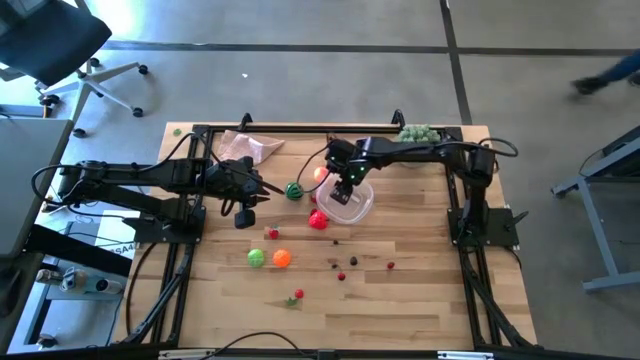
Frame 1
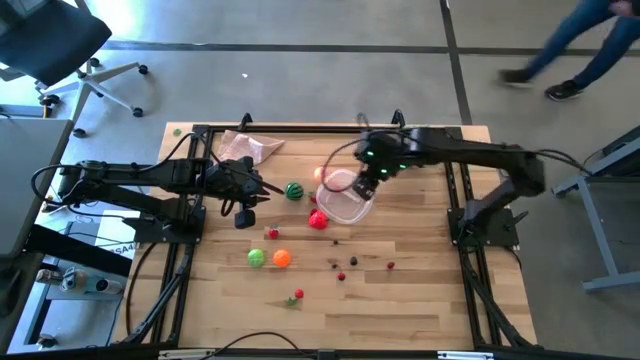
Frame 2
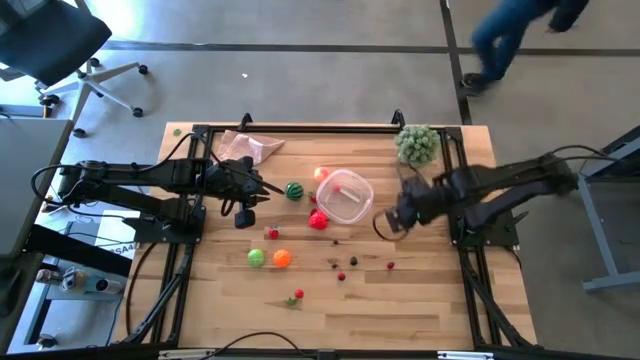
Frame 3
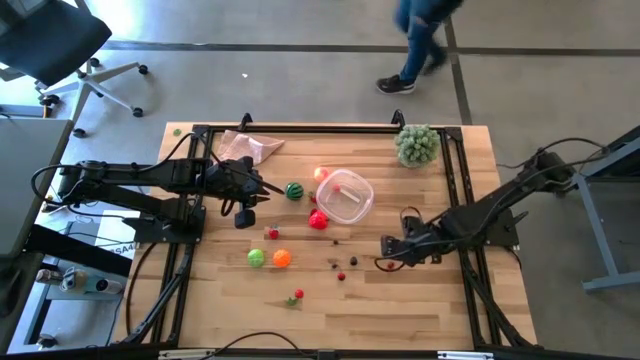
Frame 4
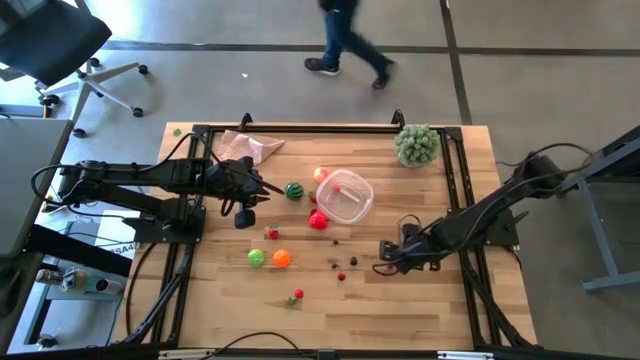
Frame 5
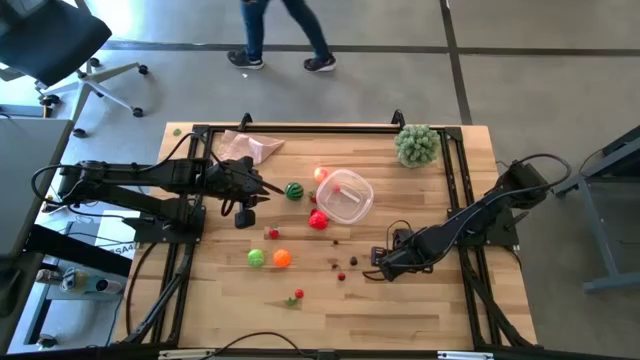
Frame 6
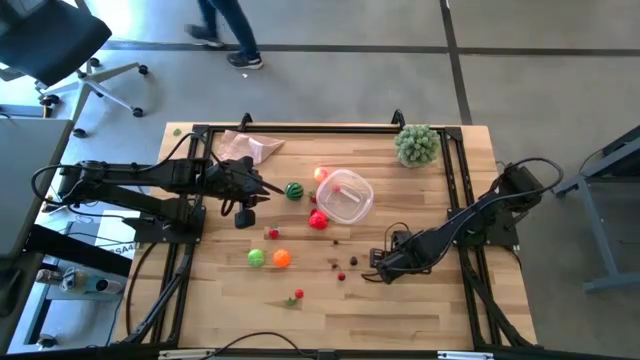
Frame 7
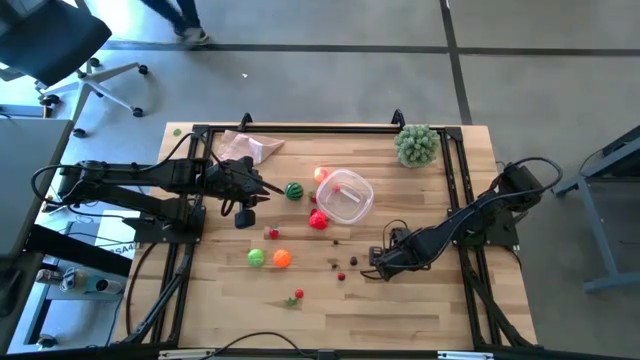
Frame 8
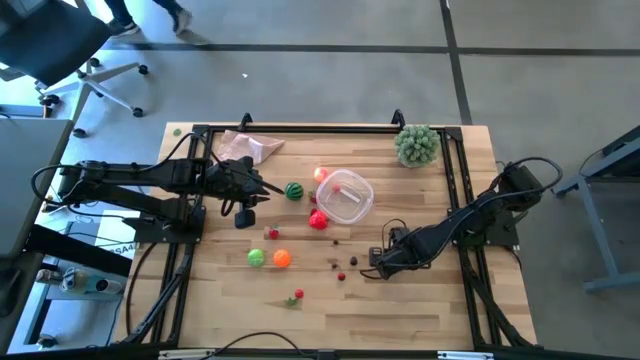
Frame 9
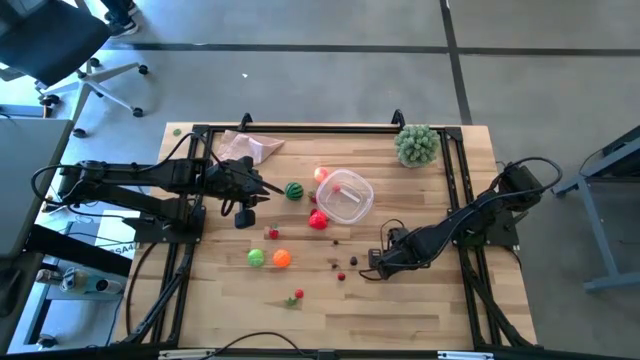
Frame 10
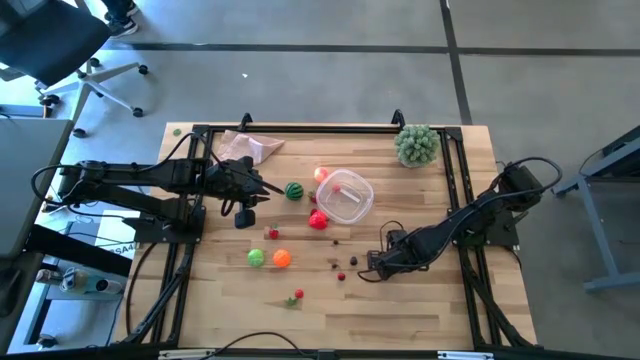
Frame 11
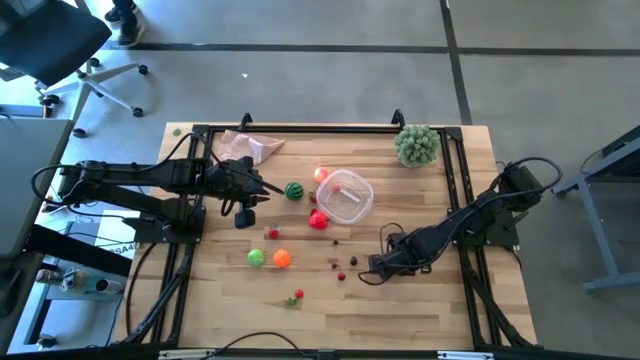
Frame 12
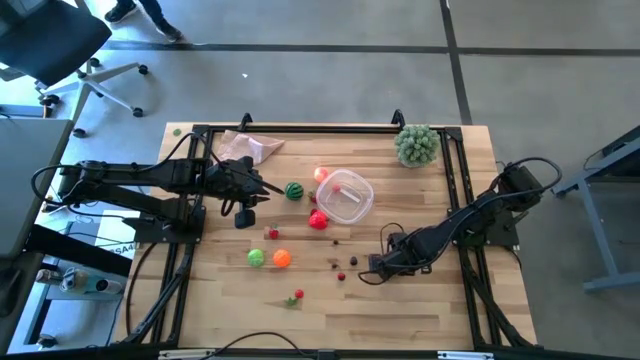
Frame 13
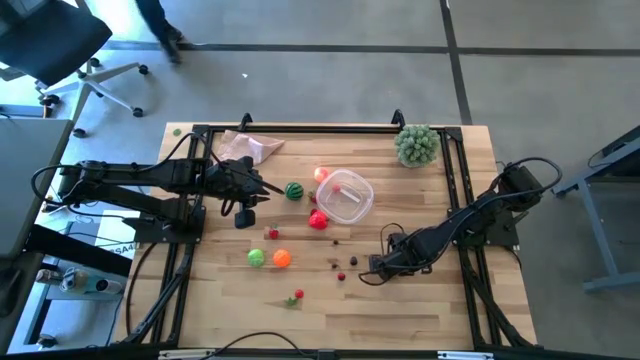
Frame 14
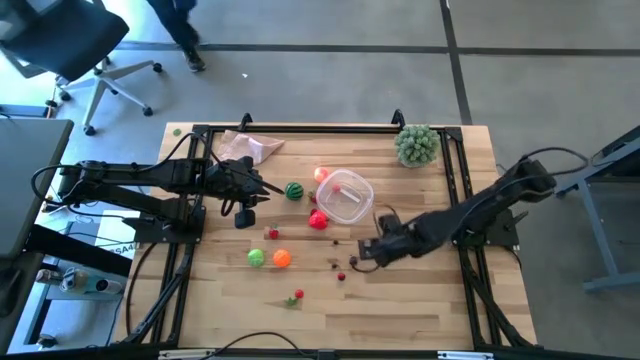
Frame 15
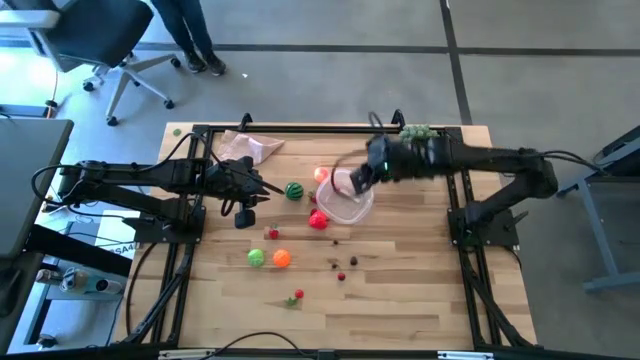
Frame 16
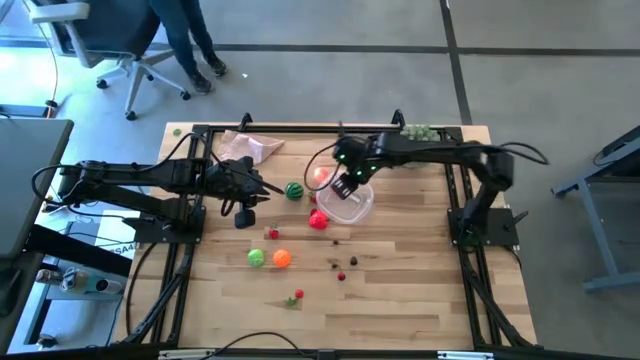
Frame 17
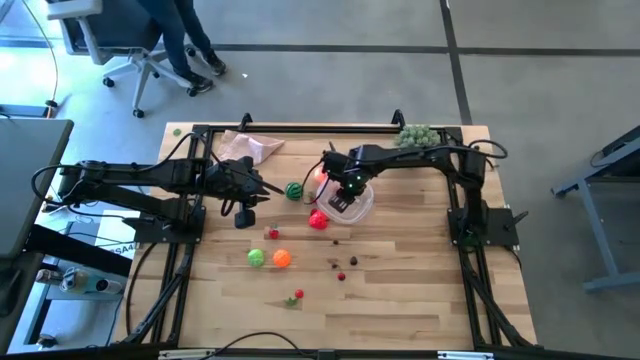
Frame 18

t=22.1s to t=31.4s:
Task: Pick and placing Produce into tupperware
Put the cherry into the transparent bin

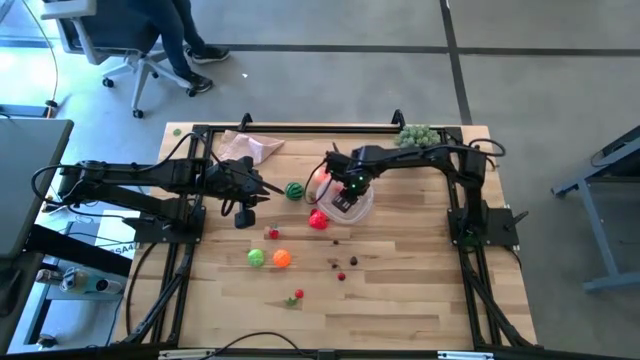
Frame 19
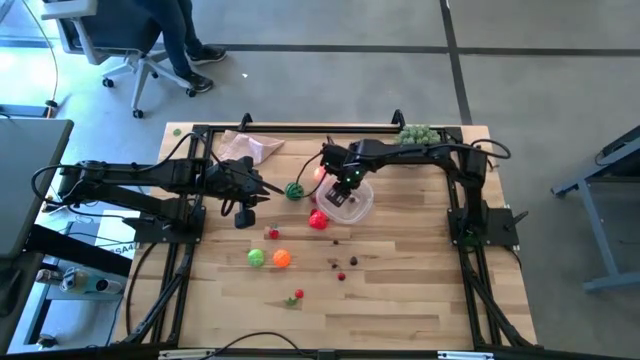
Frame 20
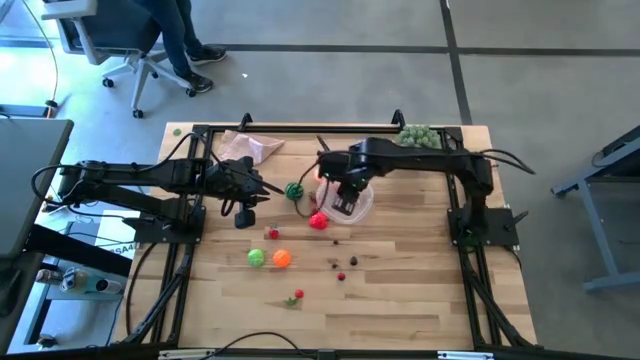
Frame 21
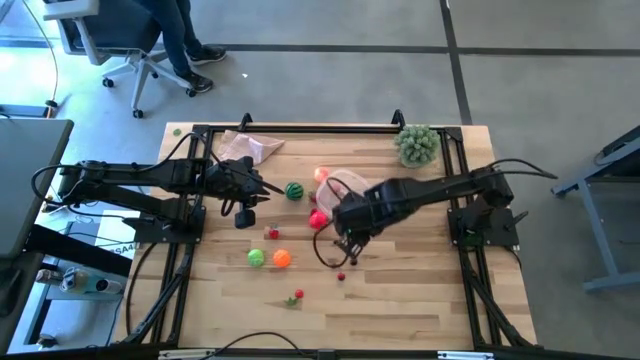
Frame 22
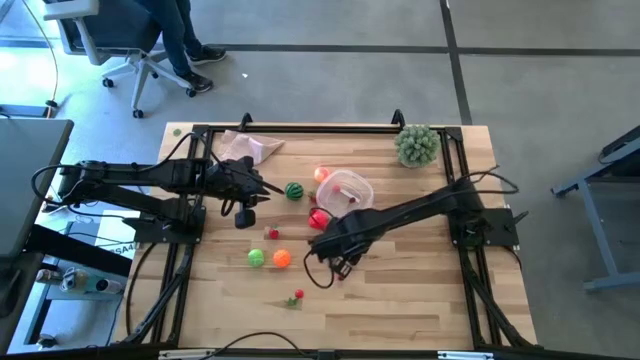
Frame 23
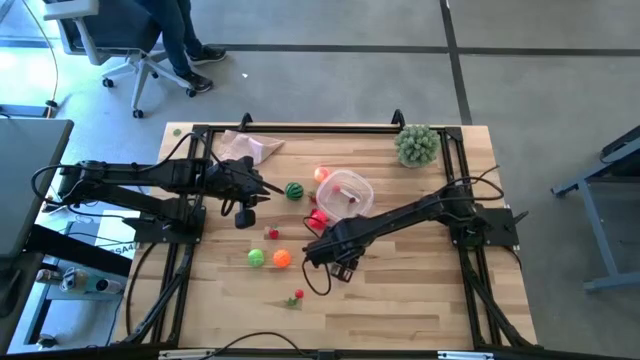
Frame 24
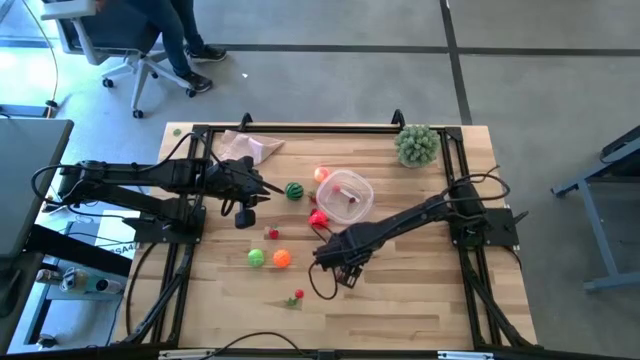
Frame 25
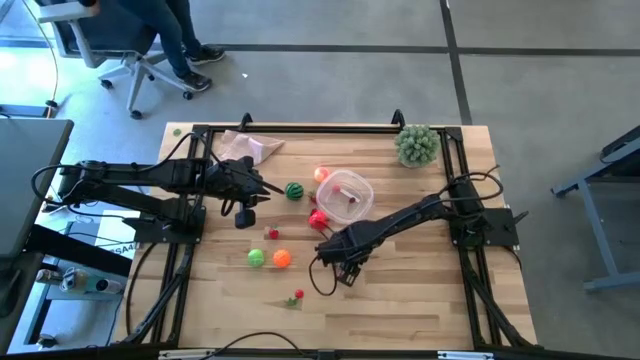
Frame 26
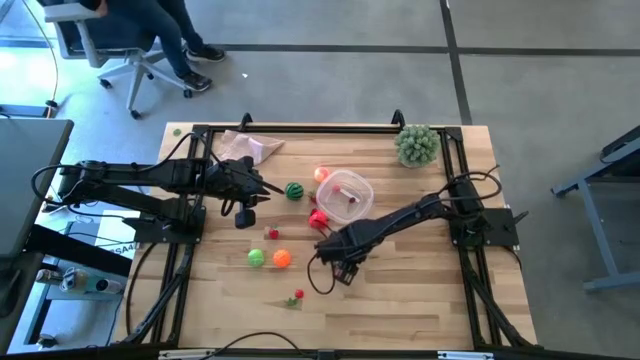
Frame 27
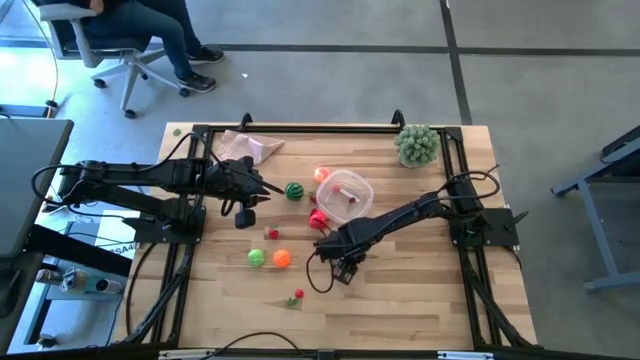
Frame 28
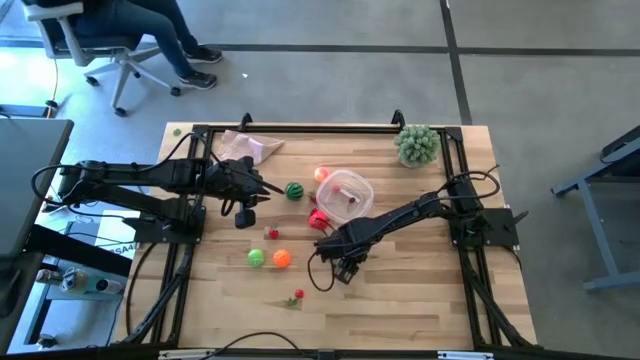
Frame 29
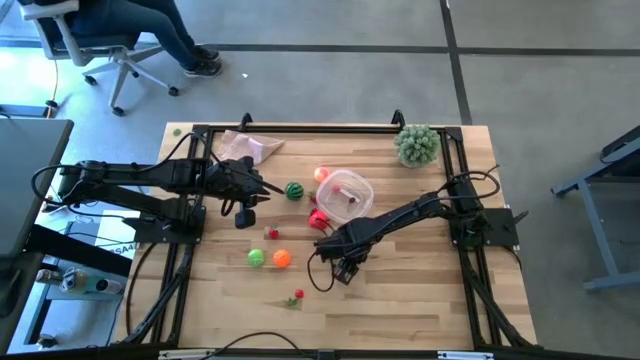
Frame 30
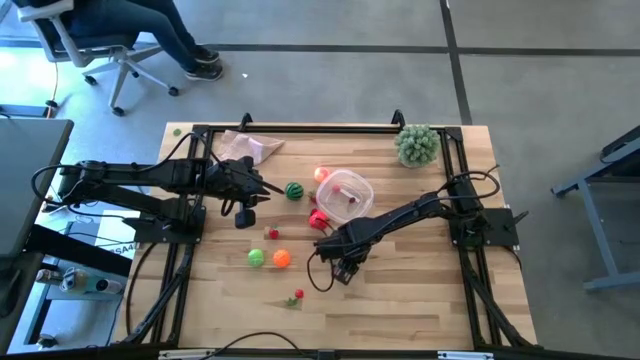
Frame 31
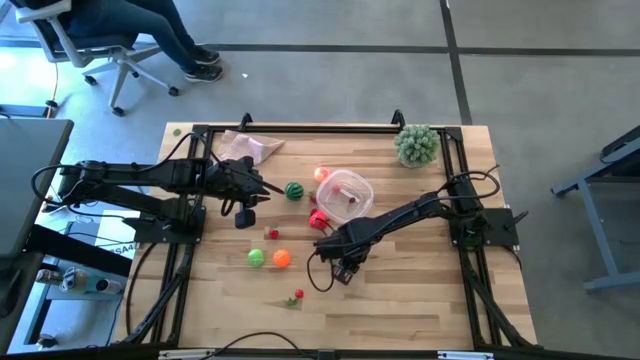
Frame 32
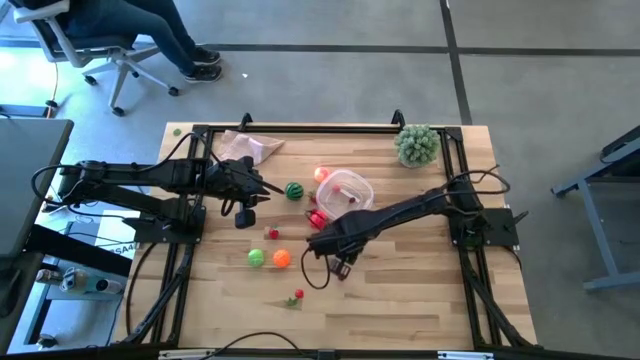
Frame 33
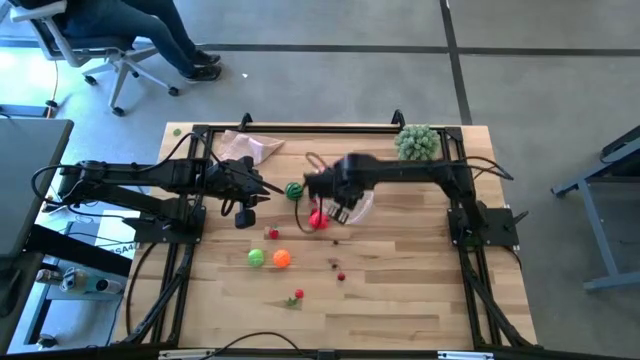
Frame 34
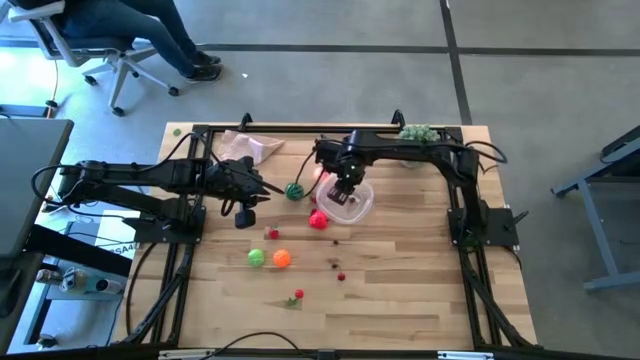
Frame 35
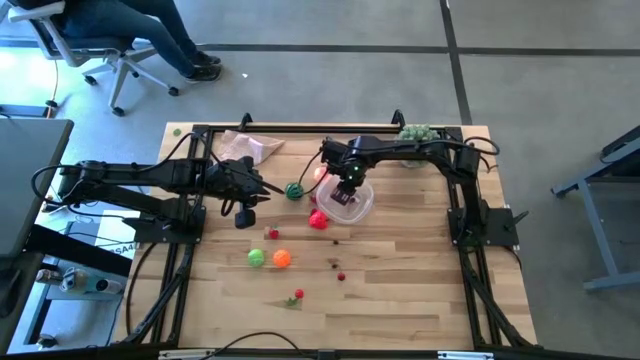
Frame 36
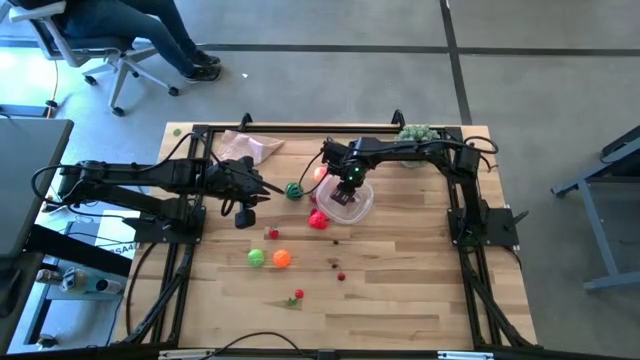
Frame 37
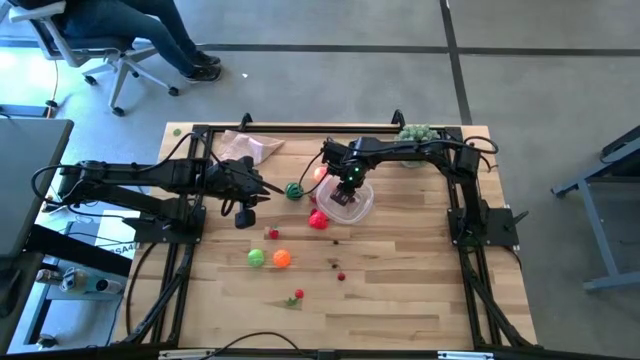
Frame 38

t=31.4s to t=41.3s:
Put the blackberry into the transparent bin

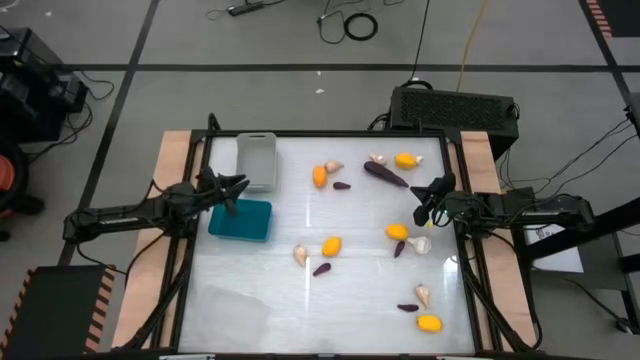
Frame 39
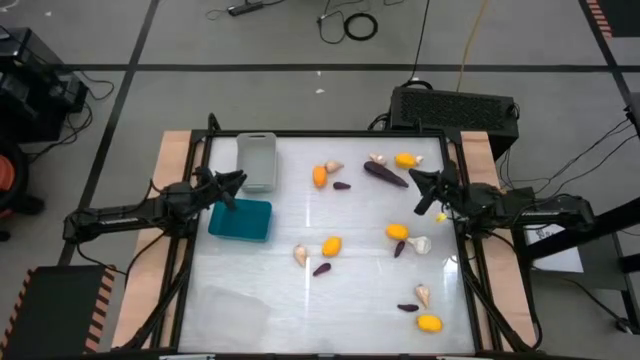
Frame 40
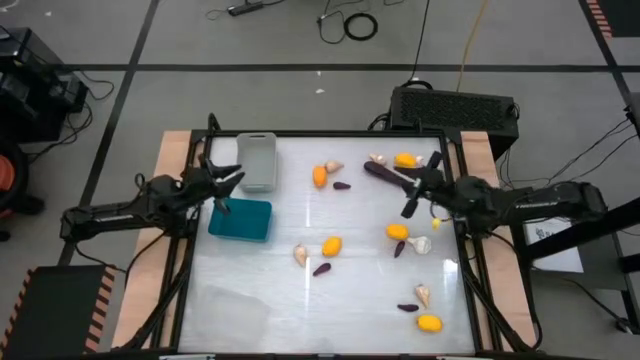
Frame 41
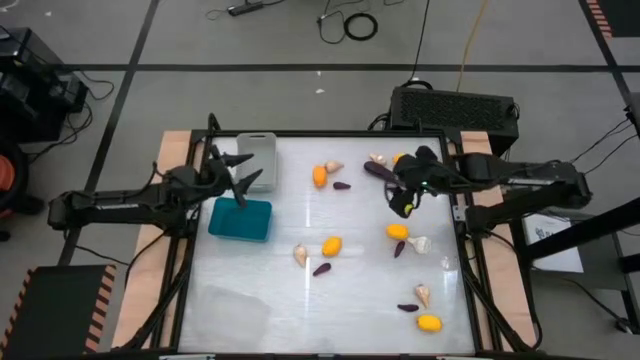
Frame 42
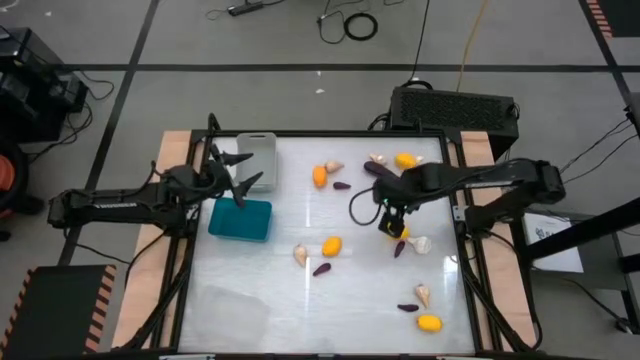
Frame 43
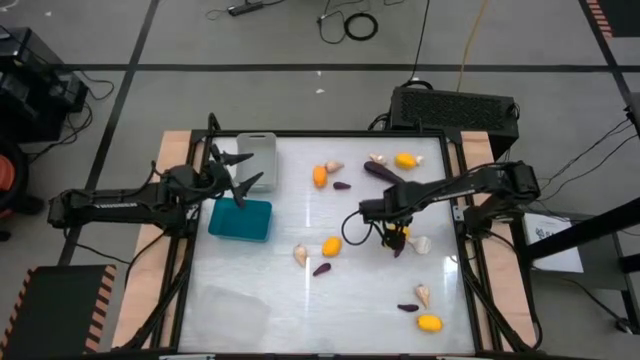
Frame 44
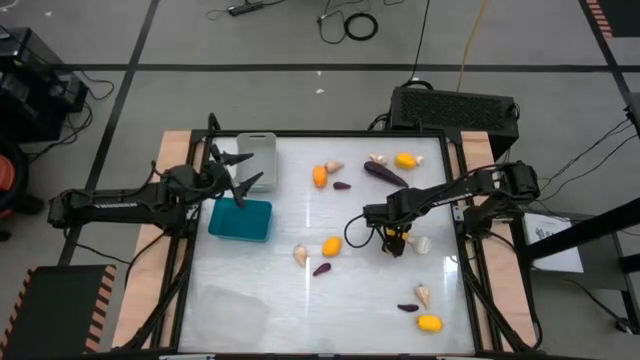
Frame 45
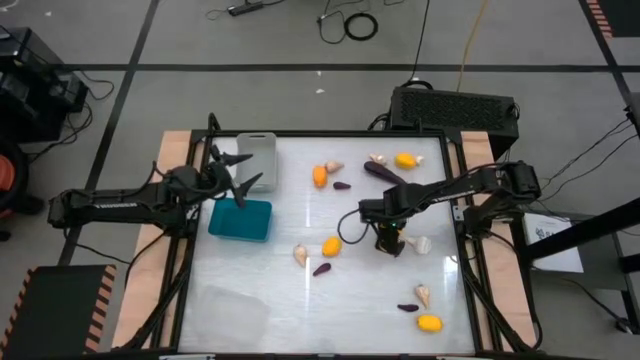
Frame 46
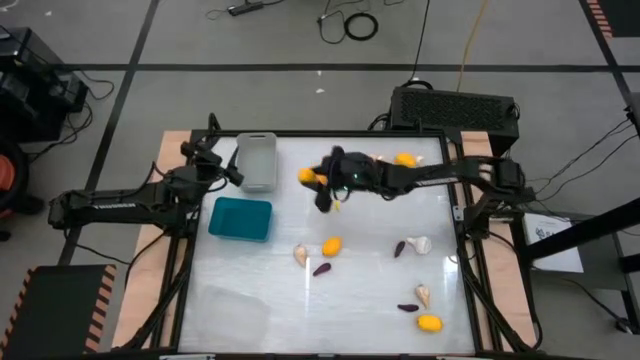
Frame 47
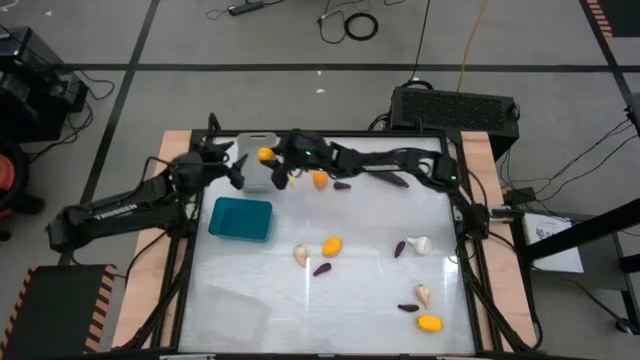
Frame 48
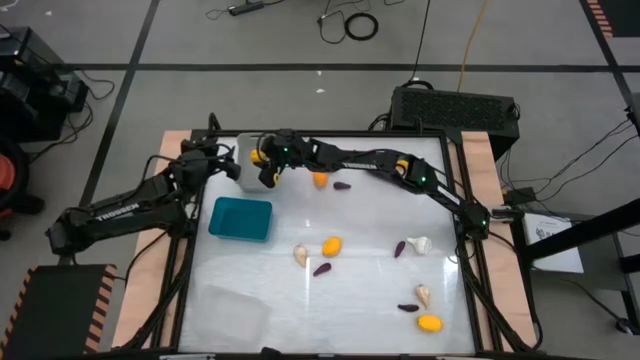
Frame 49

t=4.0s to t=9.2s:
Task: Sort produce into baskets
Put the yellow lemon into the gray bin
